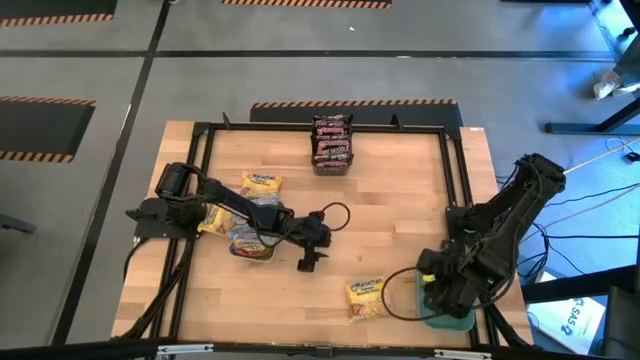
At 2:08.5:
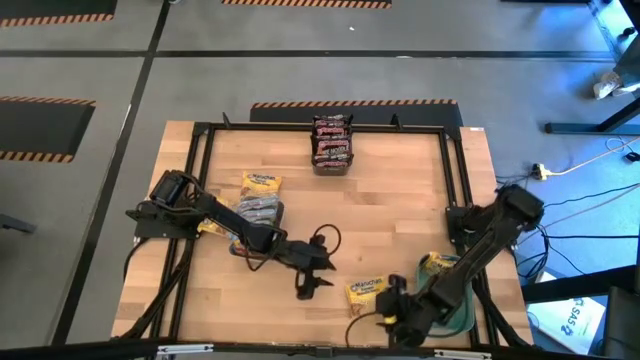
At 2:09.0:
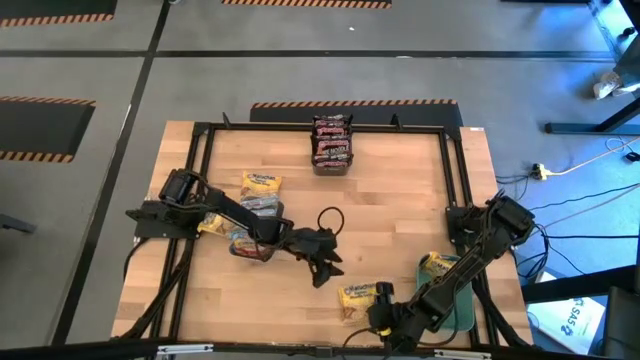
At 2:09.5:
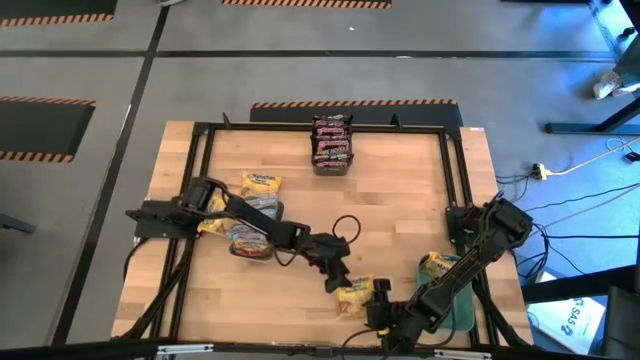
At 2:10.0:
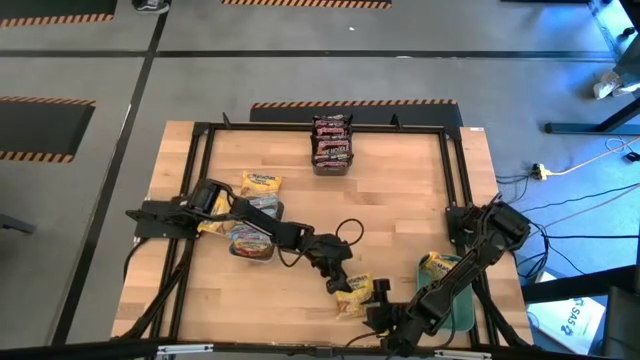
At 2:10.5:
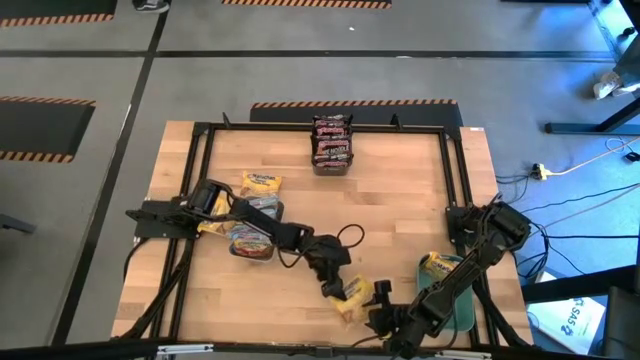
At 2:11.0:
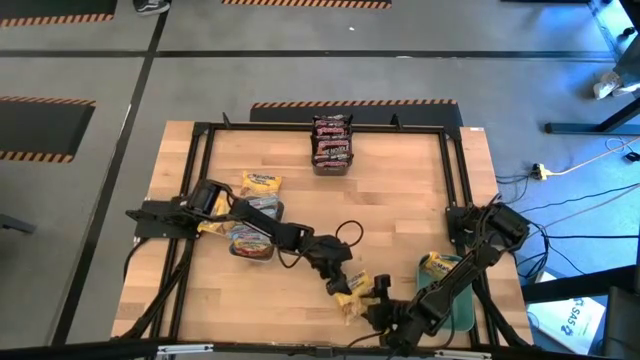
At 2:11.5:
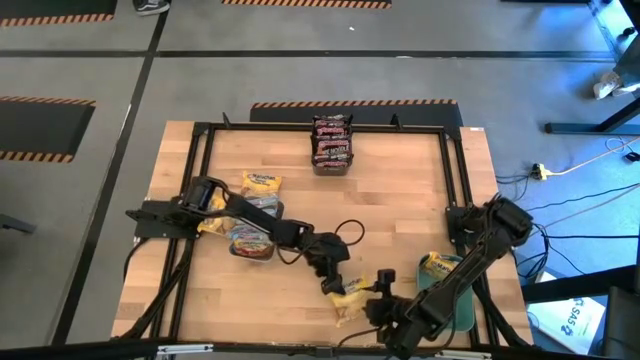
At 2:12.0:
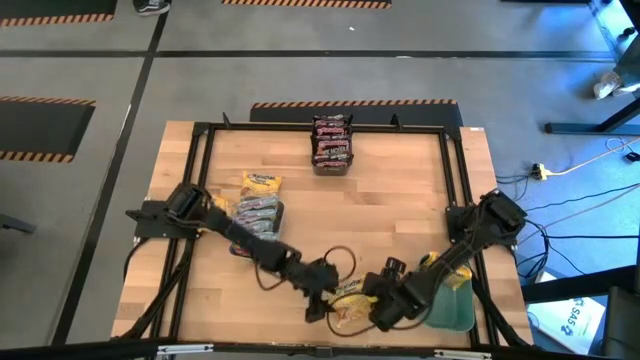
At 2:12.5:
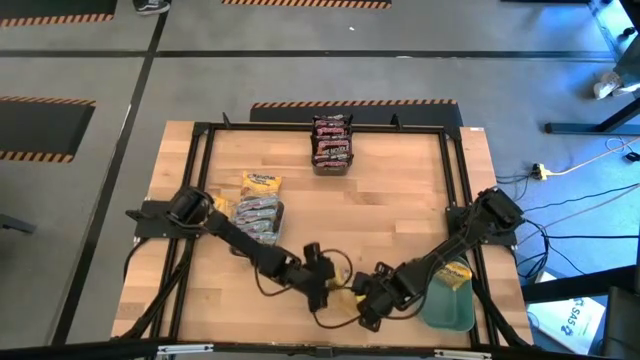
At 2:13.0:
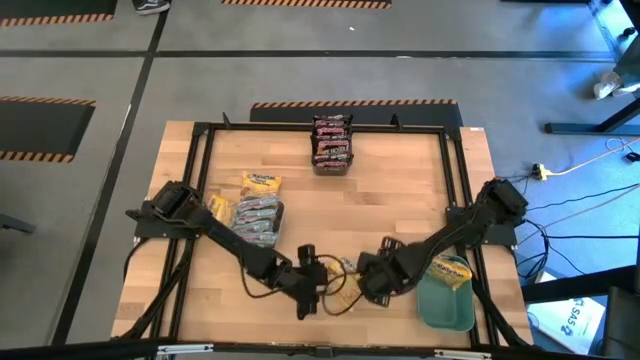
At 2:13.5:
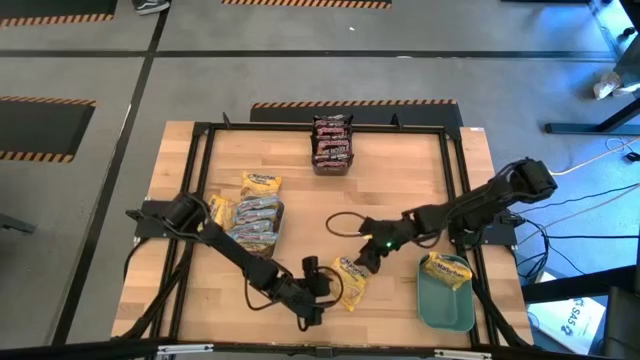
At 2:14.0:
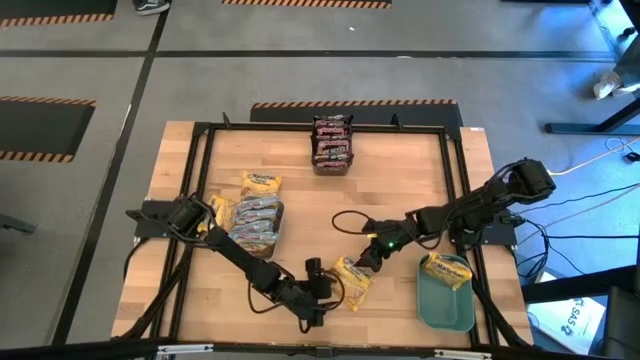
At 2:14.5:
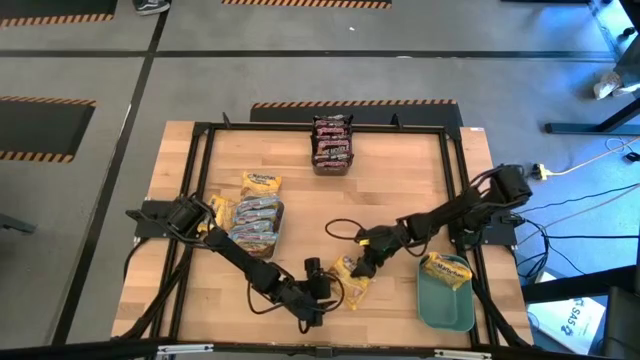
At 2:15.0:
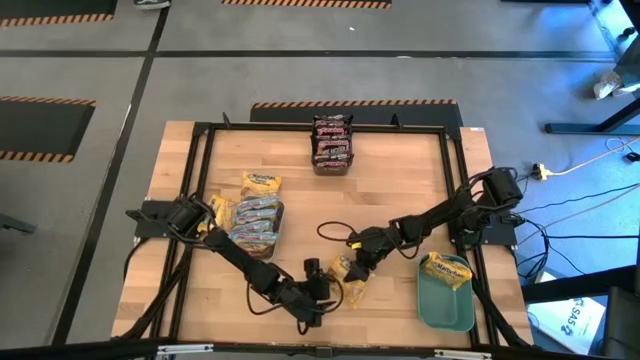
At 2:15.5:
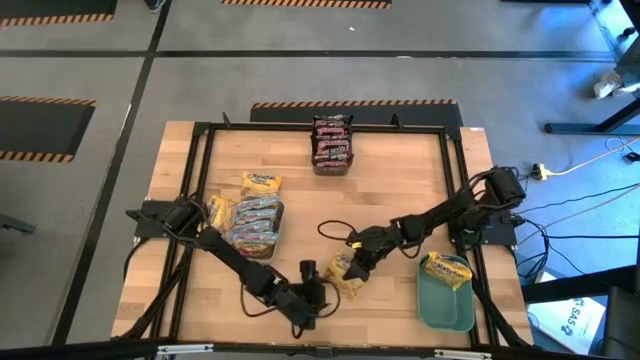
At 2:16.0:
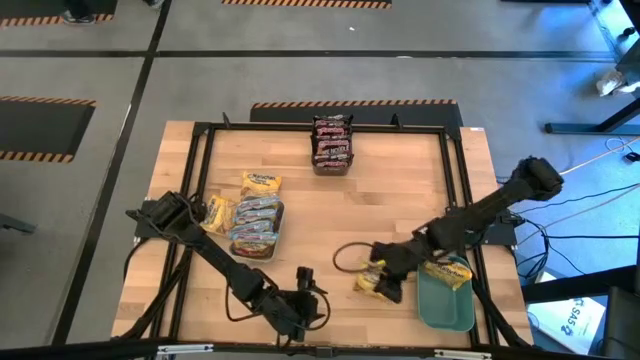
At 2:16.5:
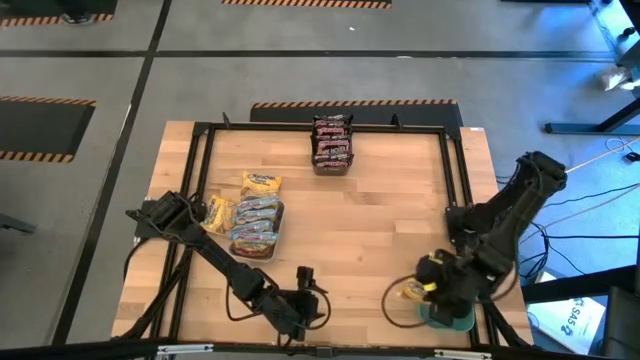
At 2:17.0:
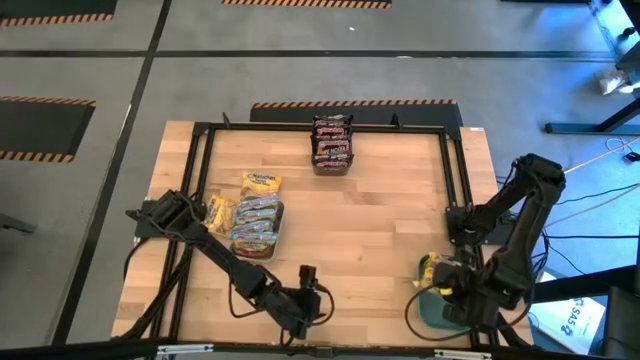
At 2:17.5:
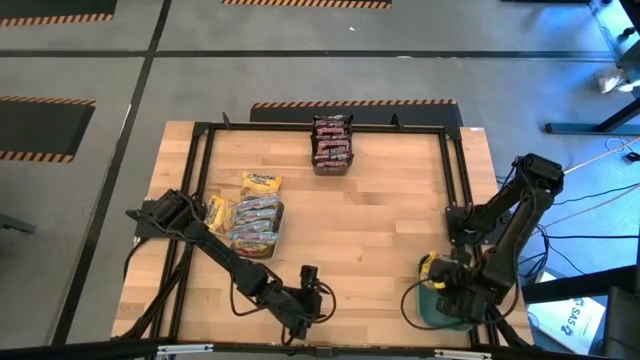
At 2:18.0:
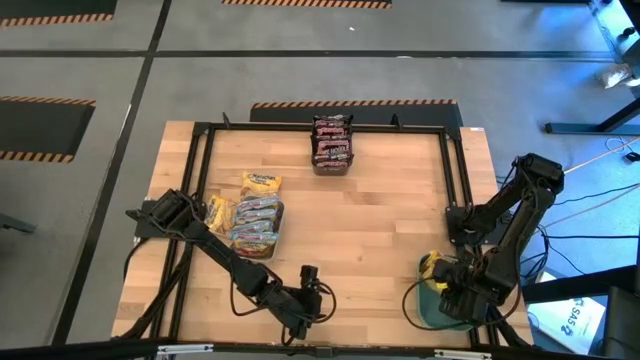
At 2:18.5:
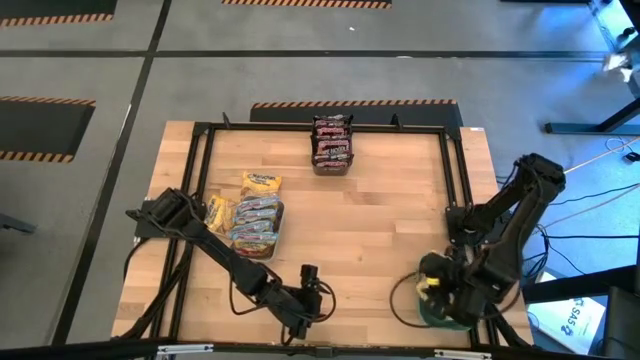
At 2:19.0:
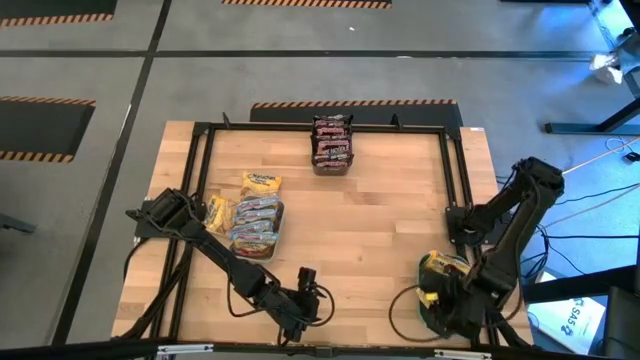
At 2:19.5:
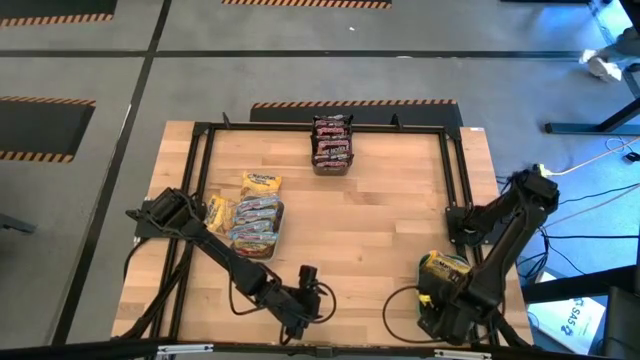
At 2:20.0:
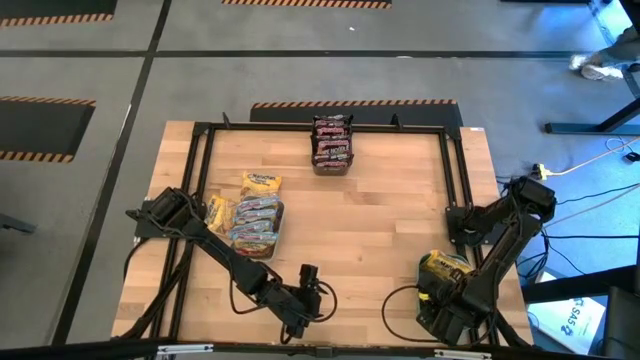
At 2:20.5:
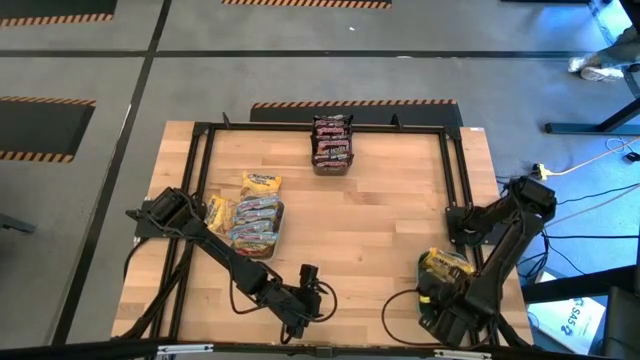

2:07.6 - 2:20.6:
Task: Sort Maruchan noodles
Put the bottom yellow noodle pack into the green bin

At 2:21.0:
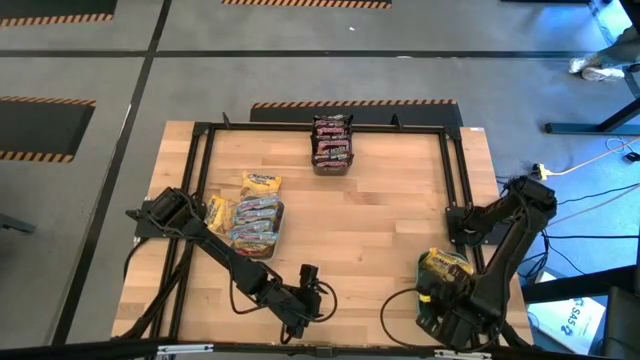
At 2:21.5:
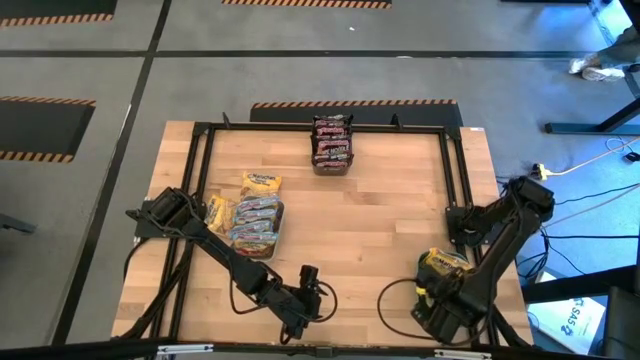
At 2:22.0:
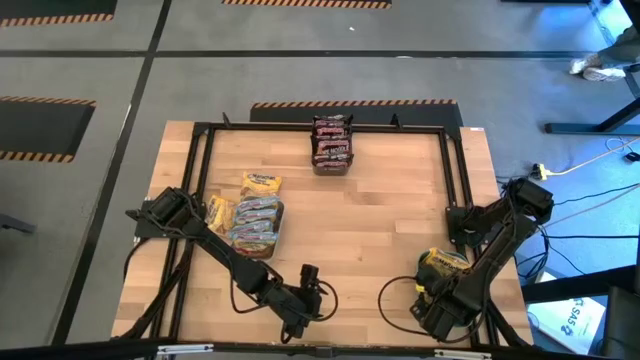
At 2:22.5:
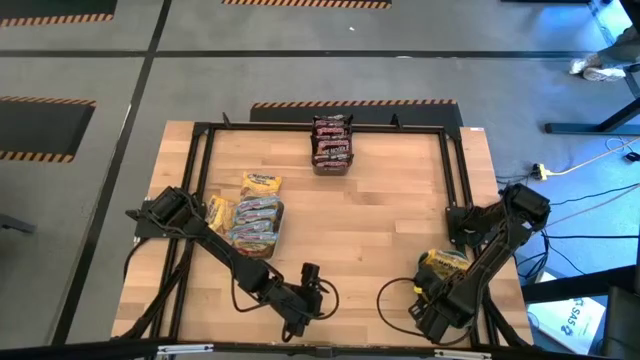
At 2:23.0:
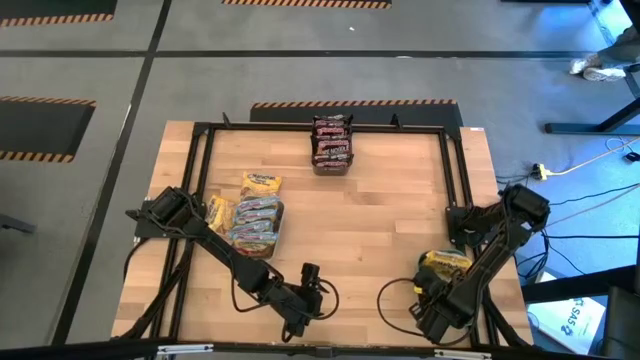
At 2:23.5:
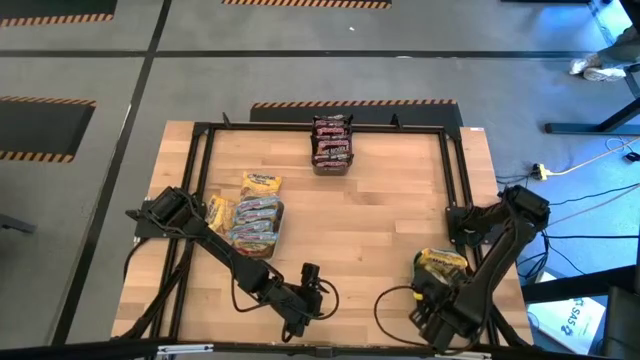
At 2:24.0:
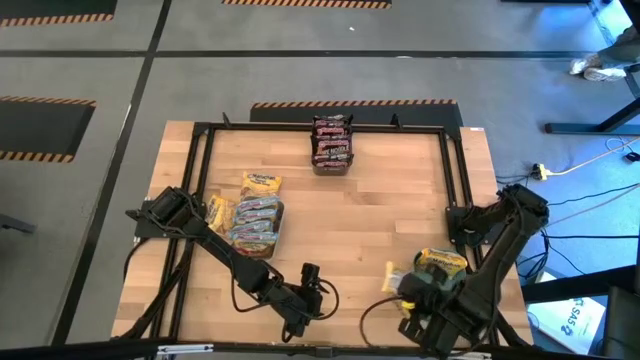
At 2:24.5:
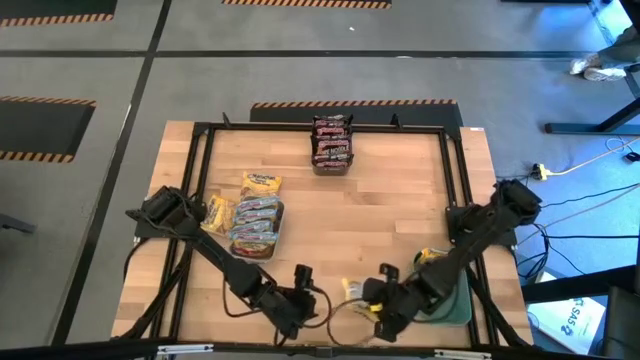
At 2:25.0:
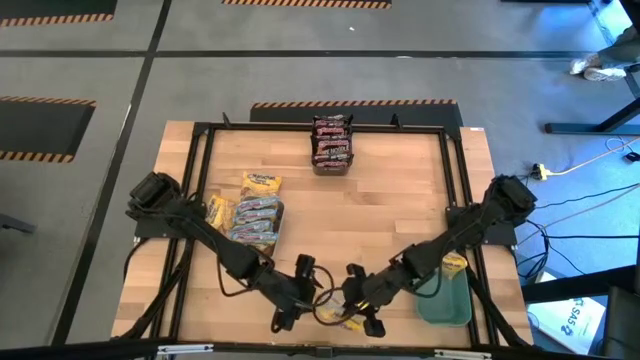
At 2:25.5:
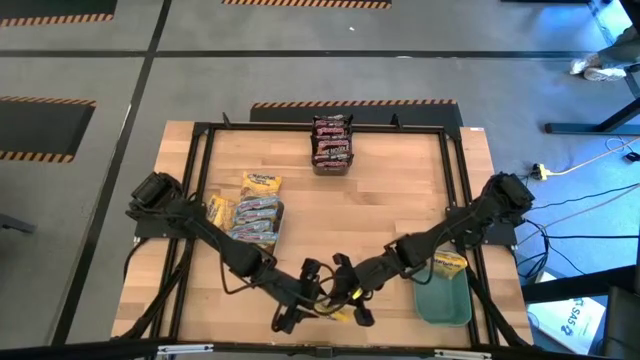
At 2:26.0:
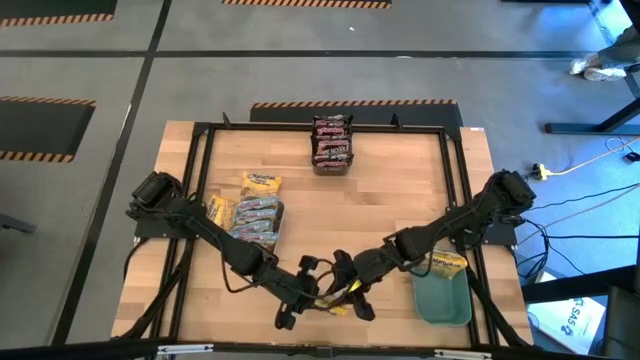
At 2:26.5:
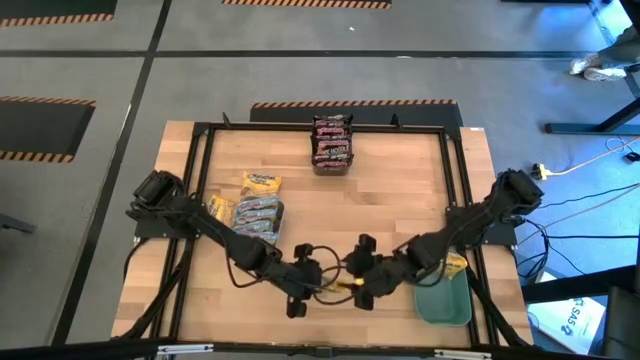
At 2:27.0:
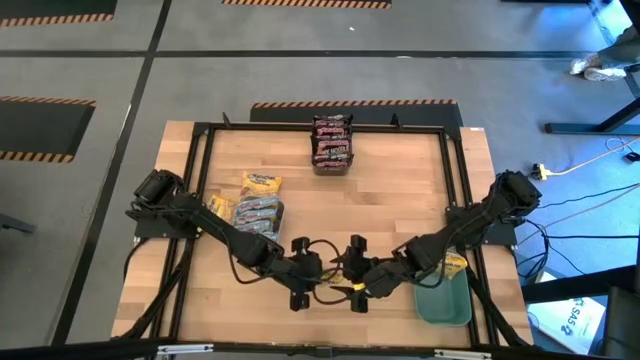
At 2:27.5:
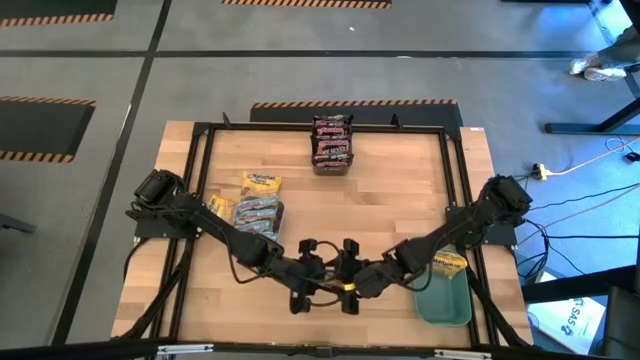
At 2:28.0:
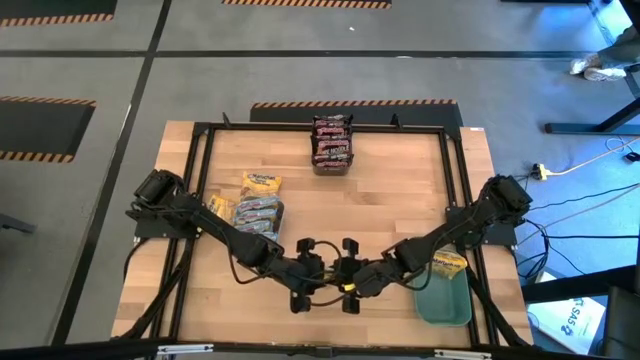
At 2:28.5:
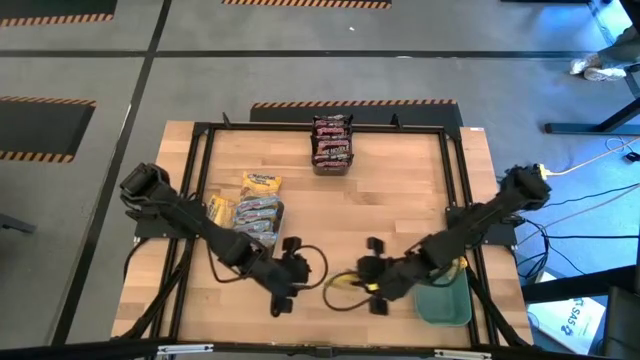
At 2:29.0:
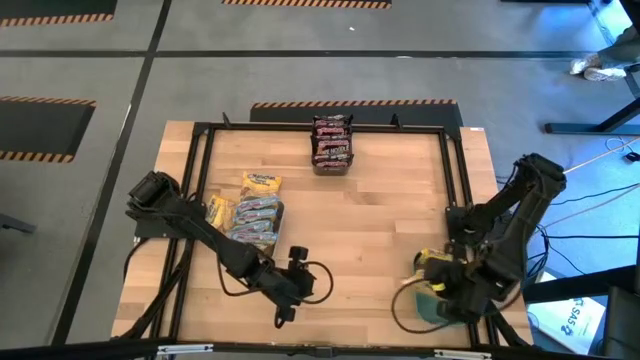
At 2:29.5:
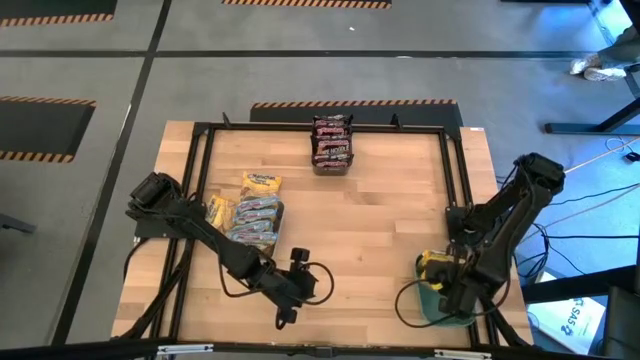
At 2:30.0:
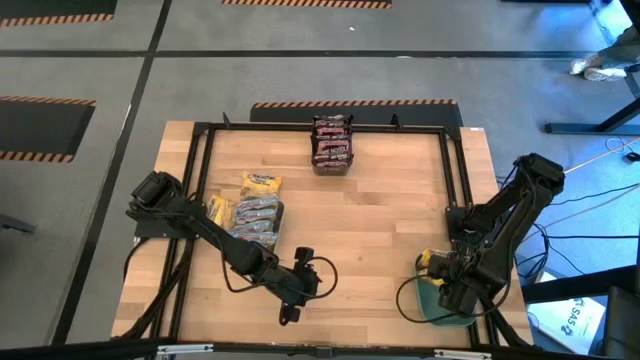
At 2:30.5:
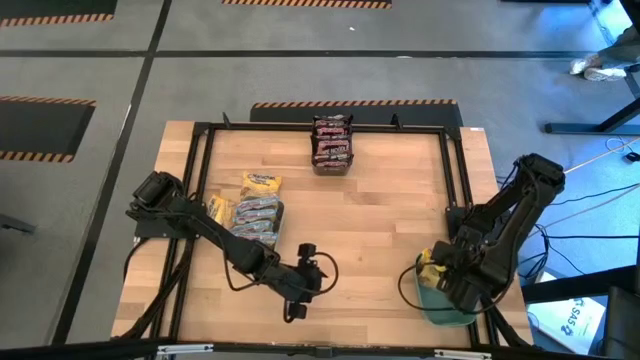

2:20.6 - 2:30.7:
Put the bottom yellow noodle pack into the green bin
